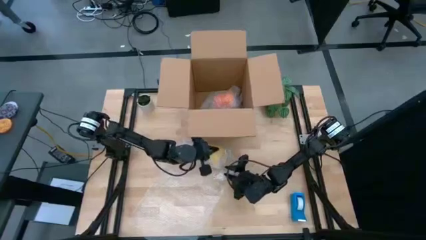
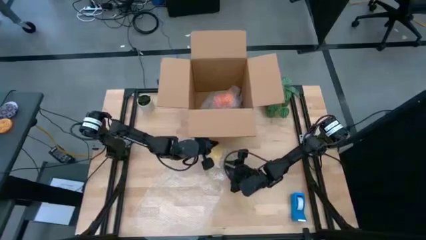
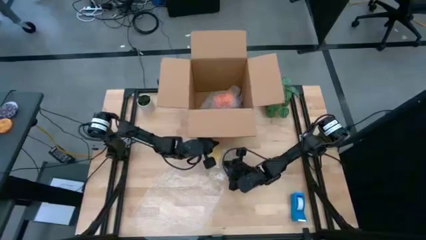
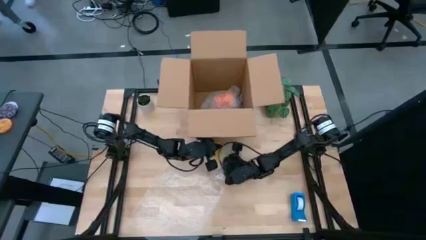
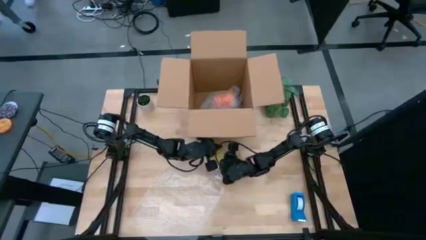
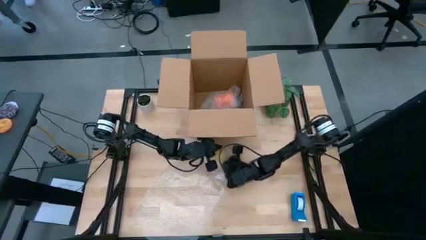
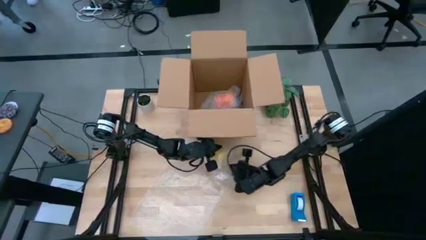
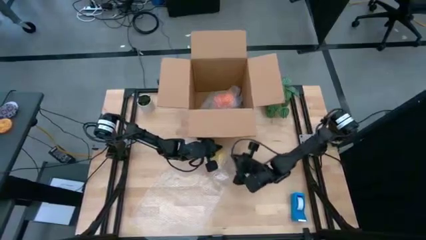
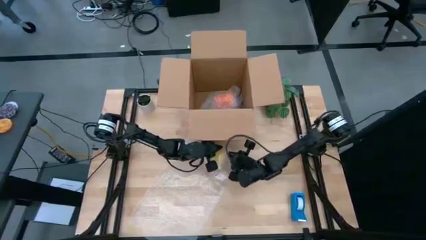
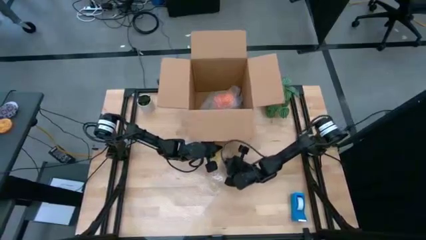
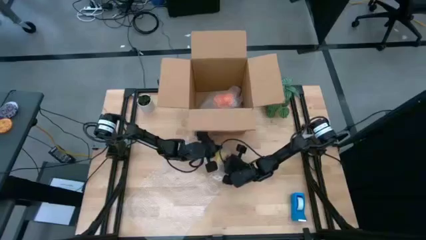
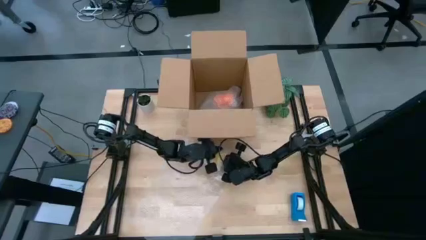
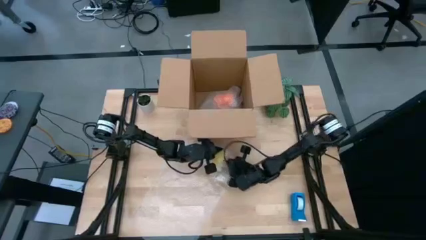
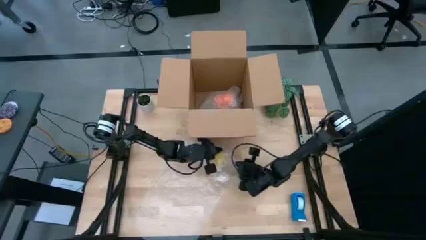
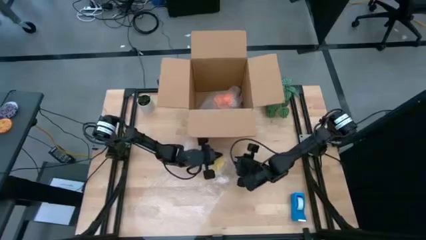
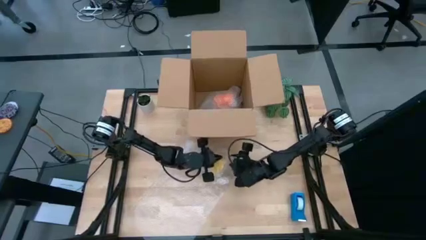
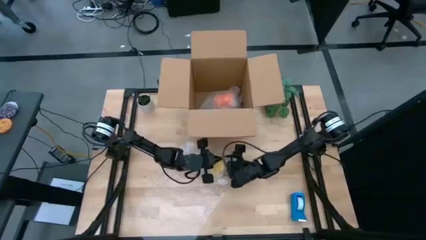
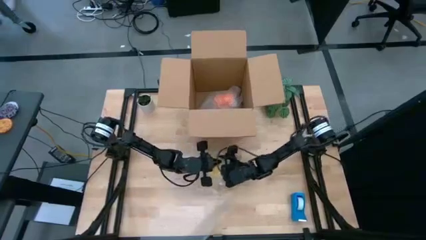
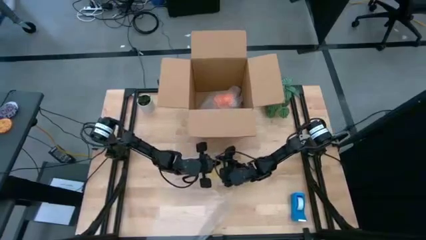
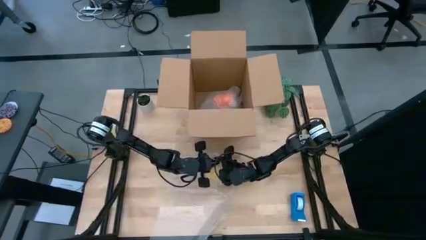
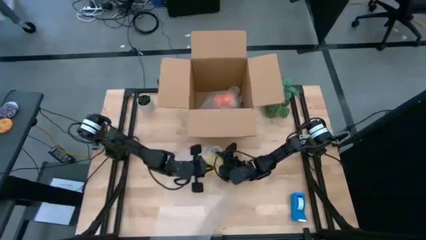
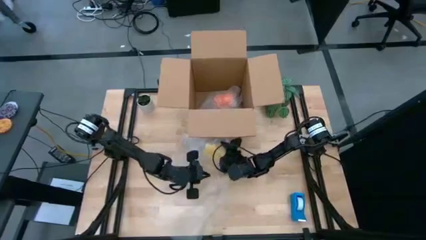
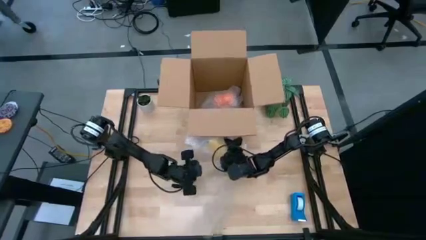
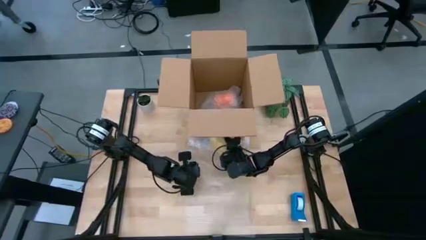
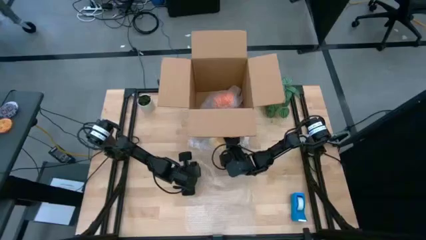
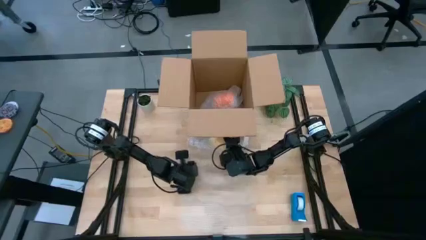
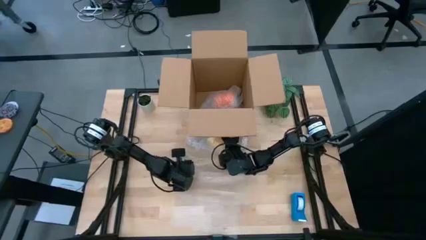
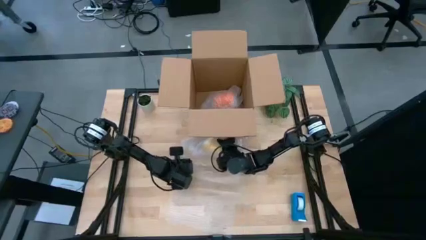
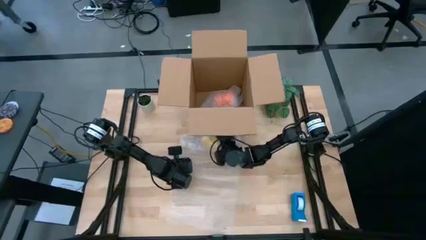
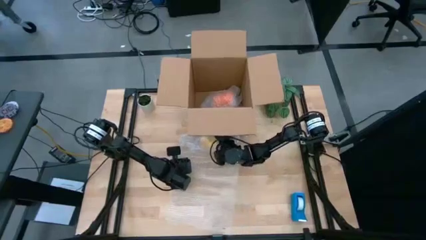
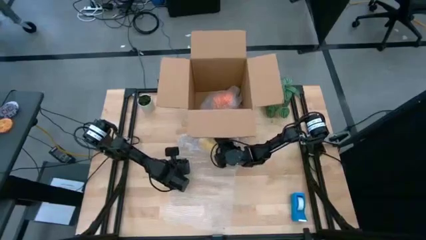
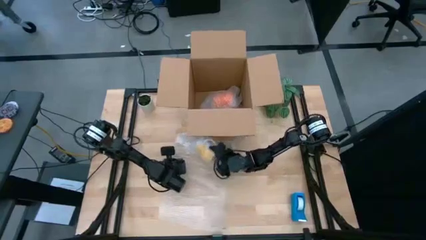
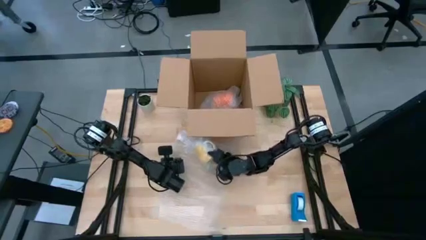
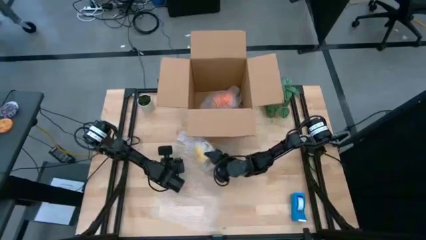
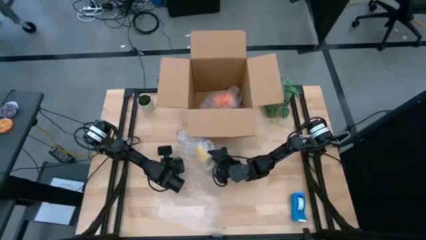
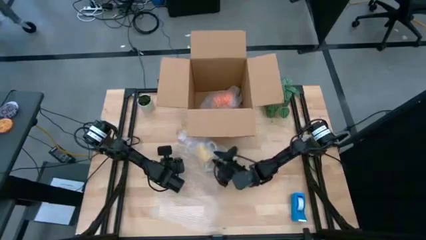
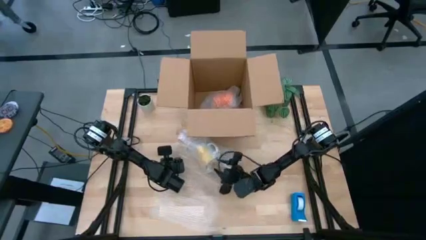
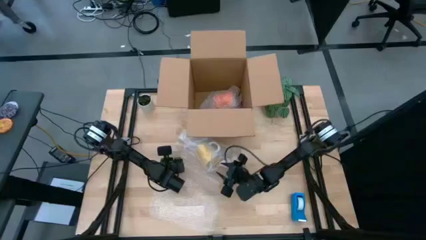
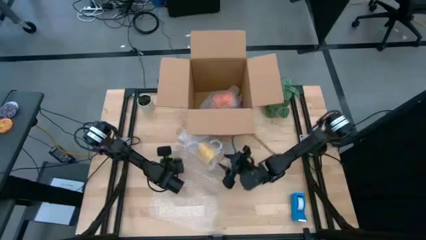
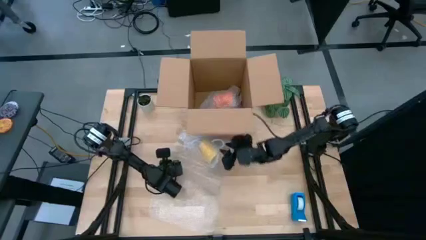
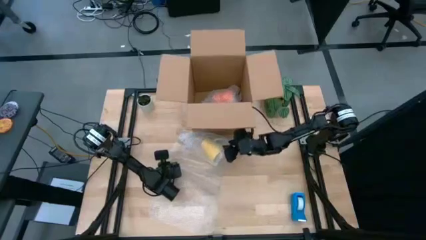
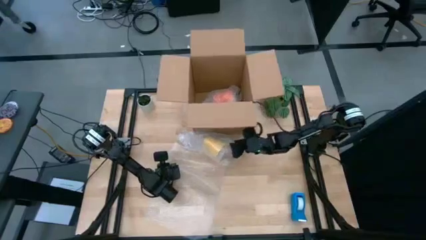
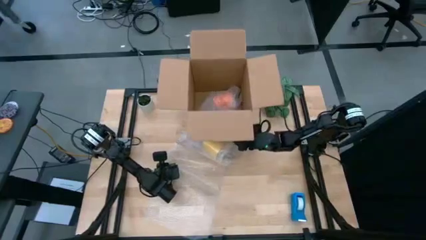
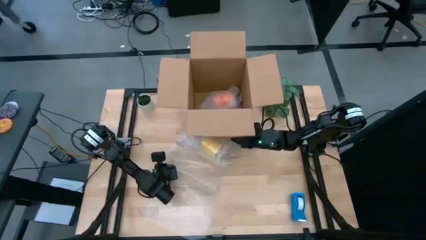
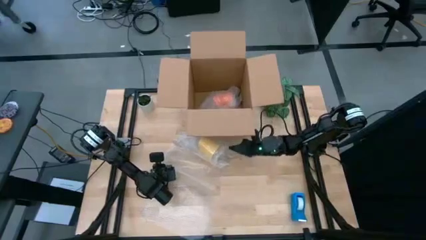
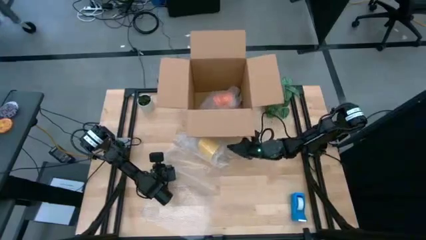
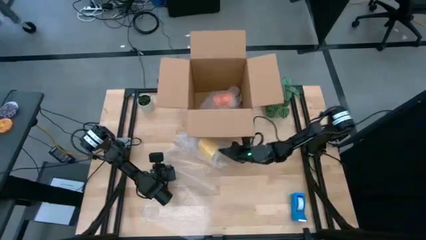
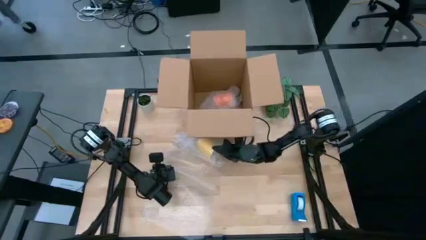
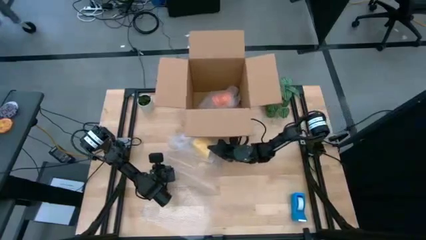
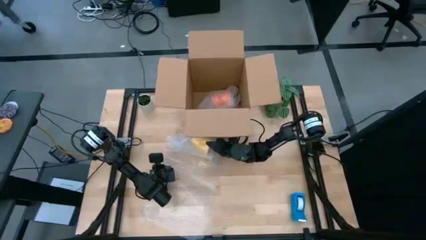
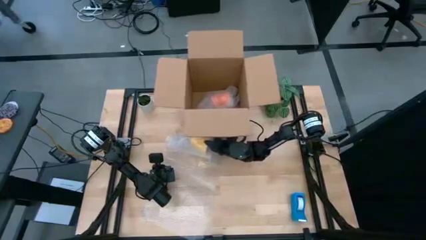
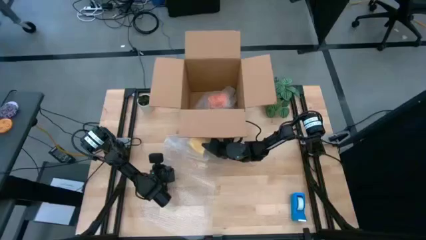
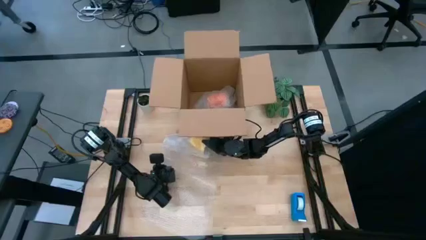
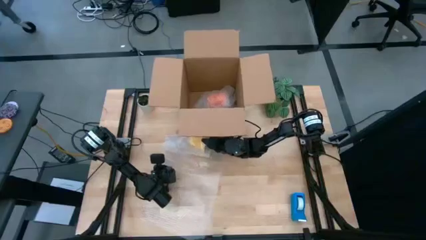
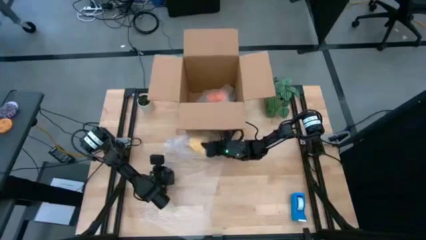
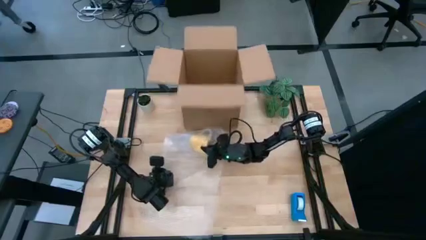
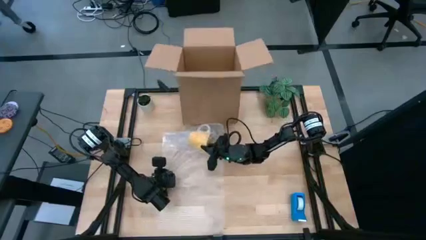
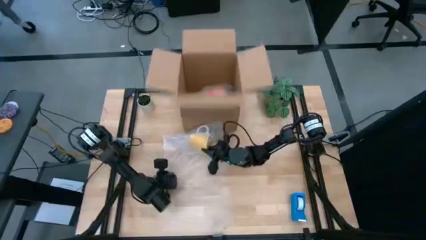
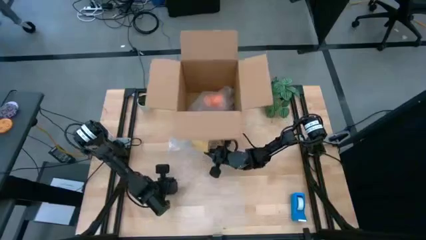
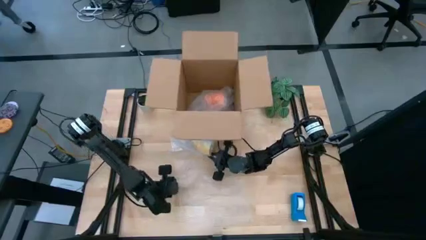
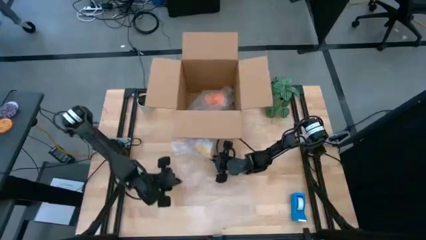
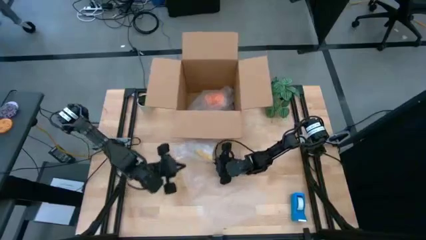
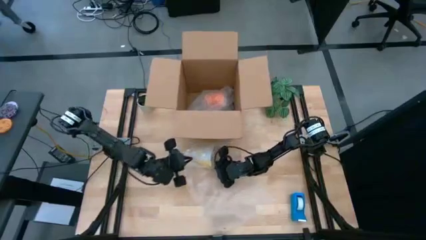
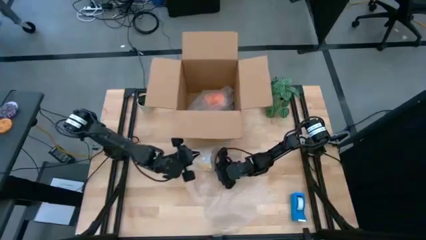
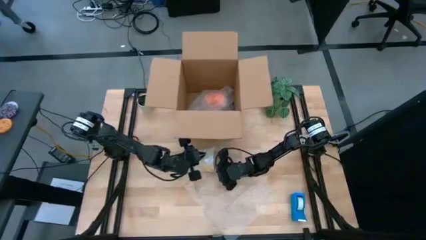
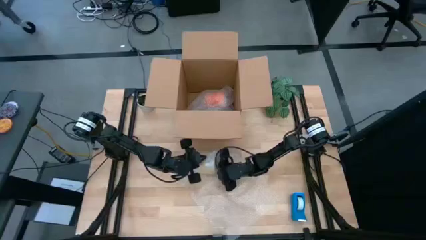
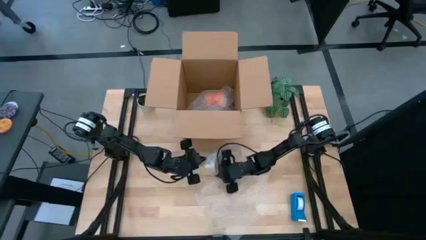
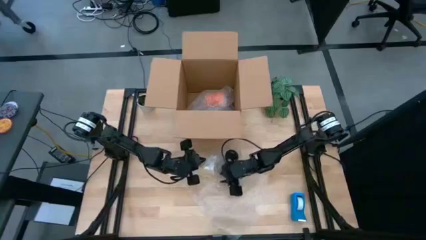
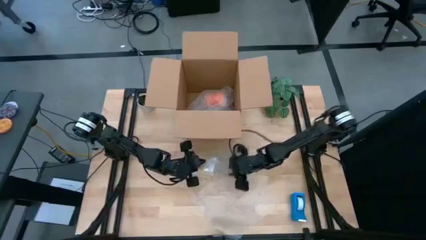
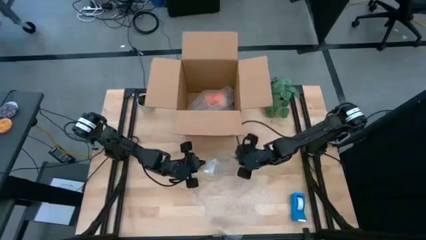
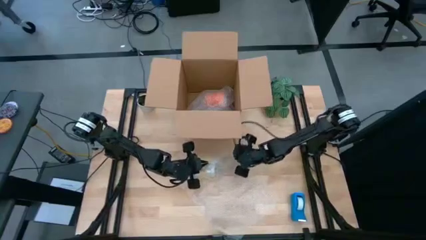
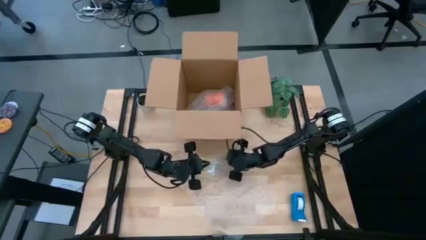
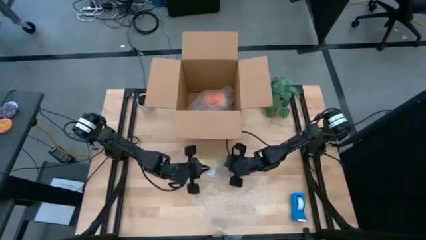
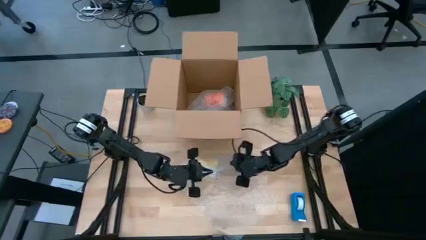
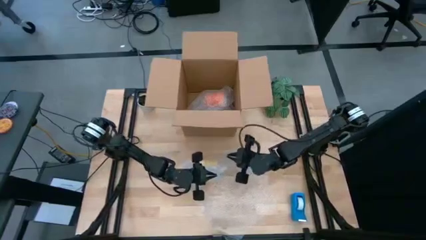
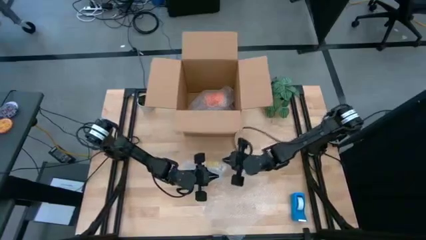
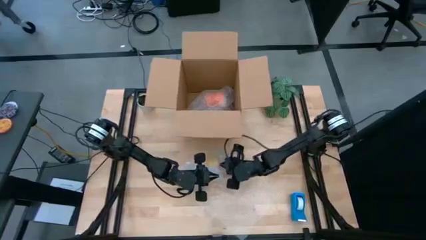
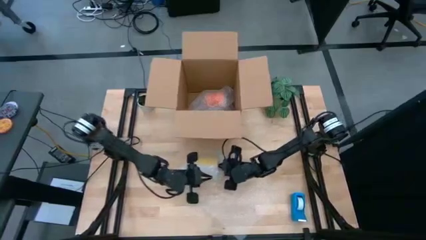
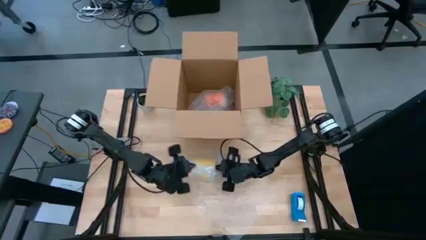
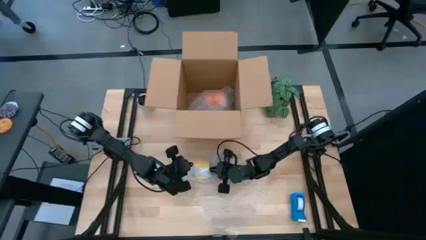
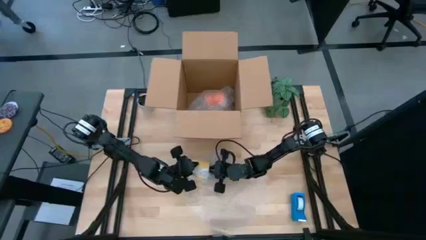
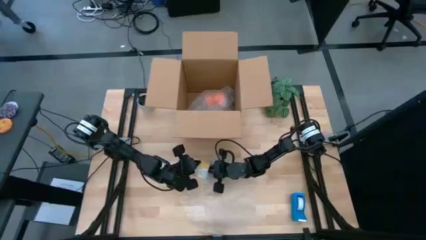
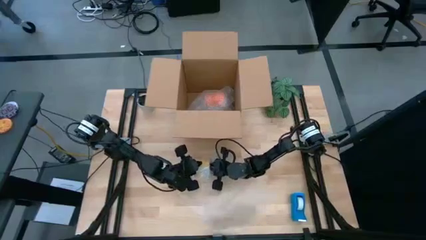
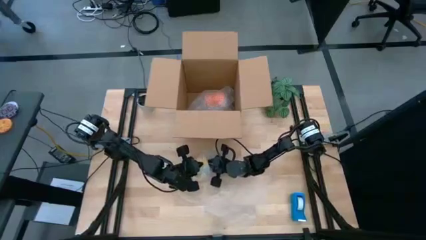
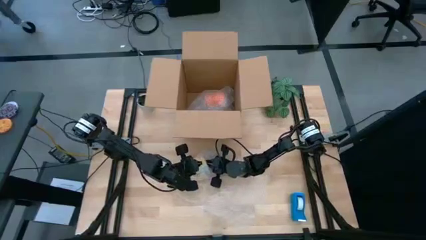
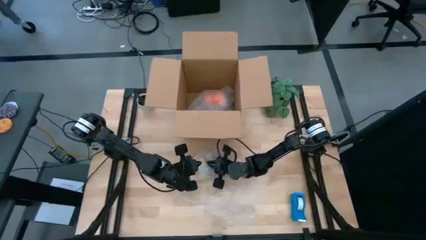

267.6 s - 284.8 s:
Task: wrap mug
Wrap the yellow mug with the bubble wrap
